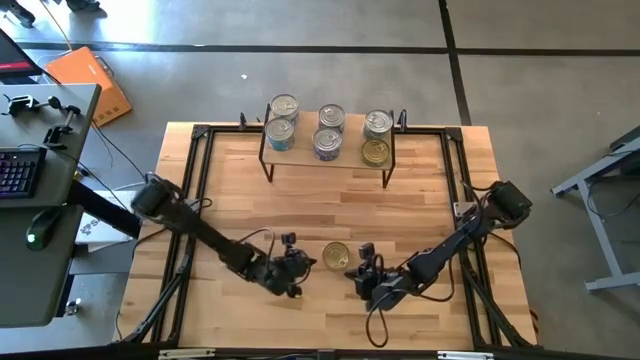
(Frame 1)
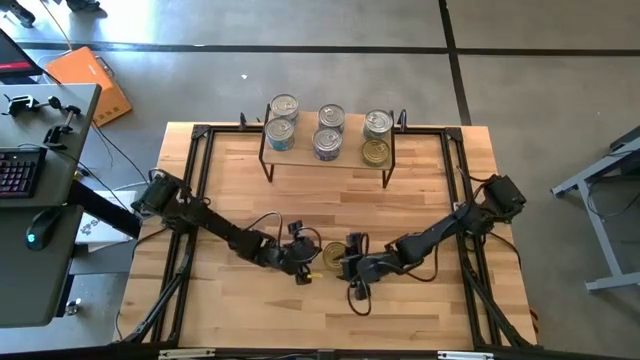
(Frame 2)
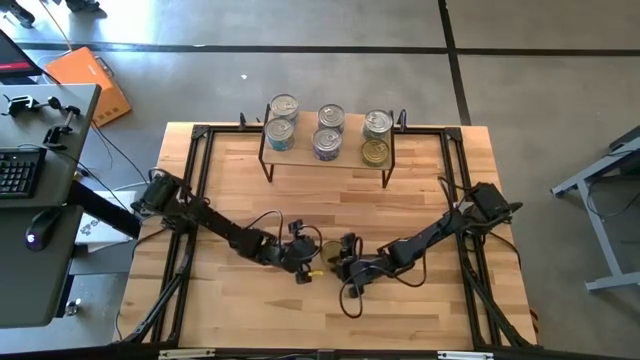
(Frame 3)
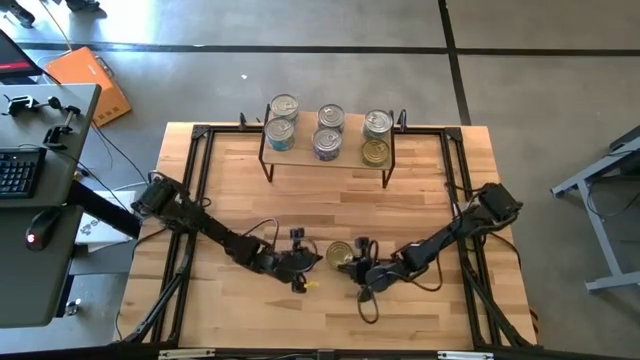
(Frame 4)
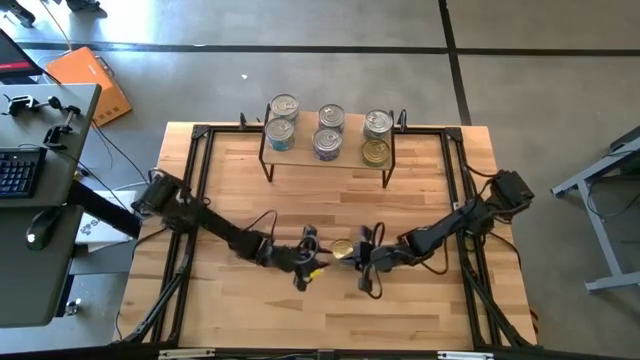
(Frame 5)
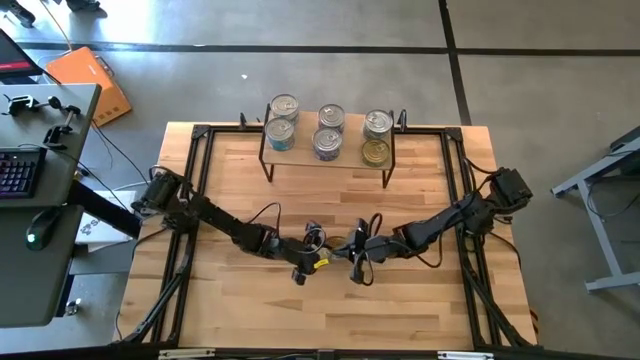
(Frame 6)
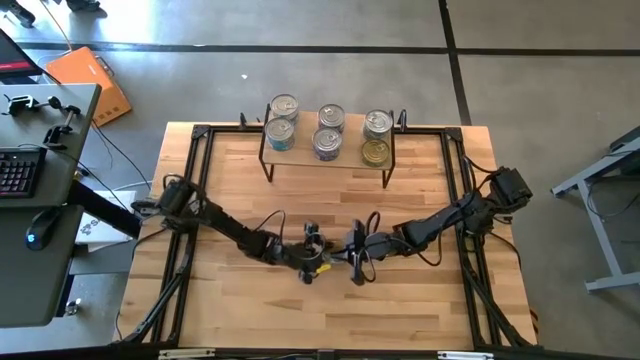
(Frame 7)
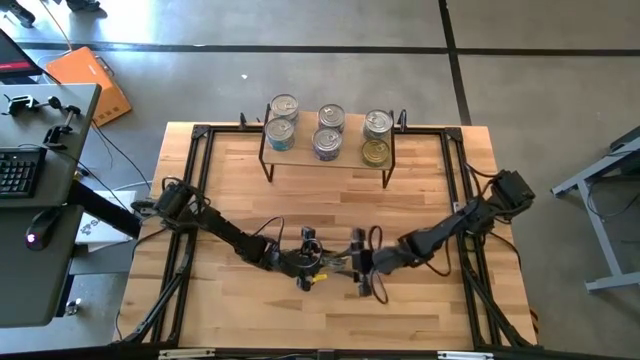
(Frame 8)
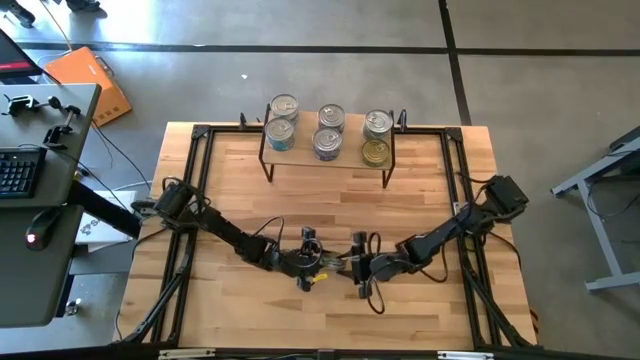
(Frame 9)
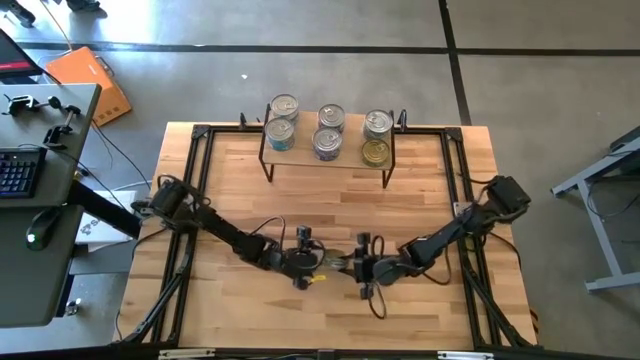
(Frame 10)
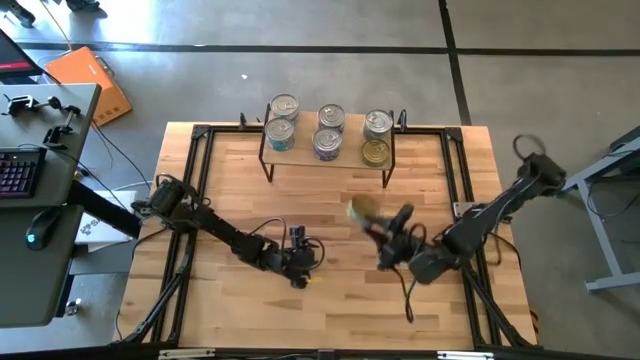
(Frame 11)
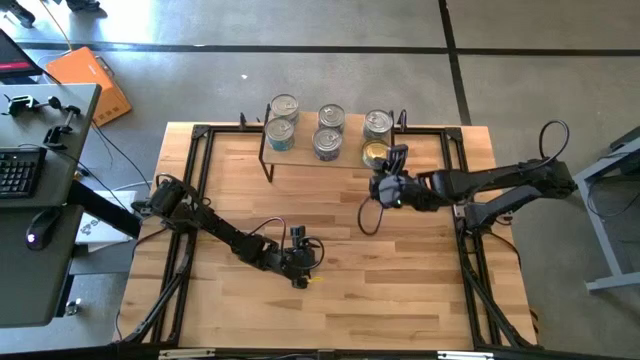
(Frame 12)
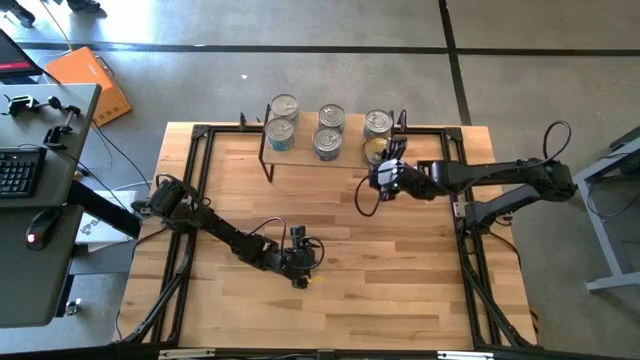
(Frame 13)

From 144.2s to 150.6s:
Task: Stack canned seafood by type on shelf
Stack the green tuna can on top of the green tuna can on the shelf

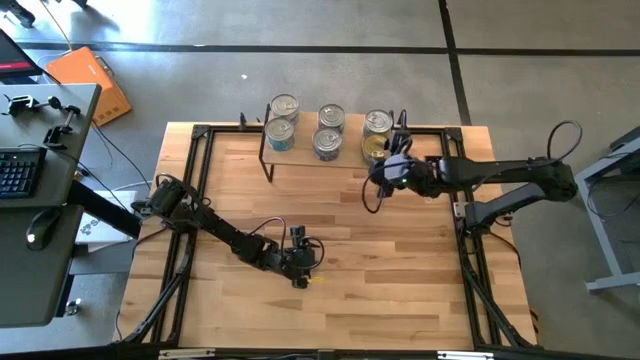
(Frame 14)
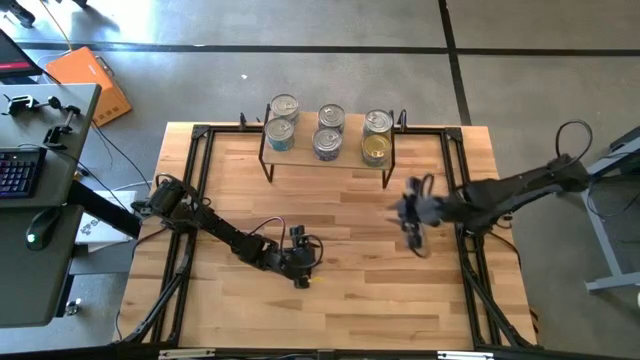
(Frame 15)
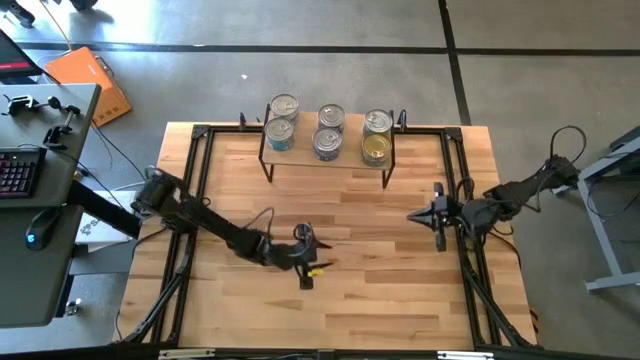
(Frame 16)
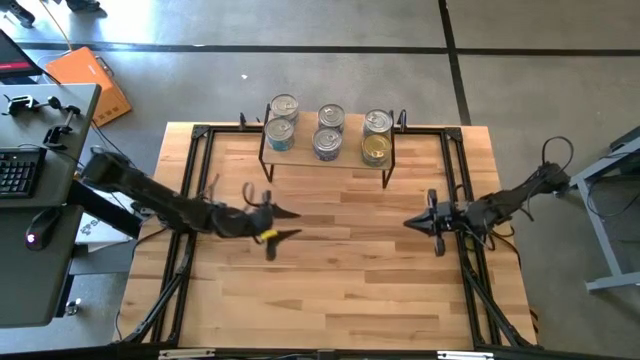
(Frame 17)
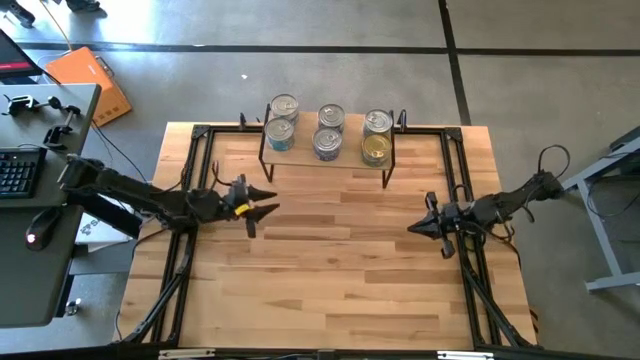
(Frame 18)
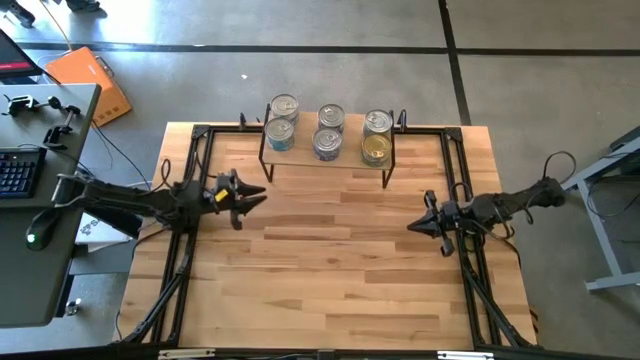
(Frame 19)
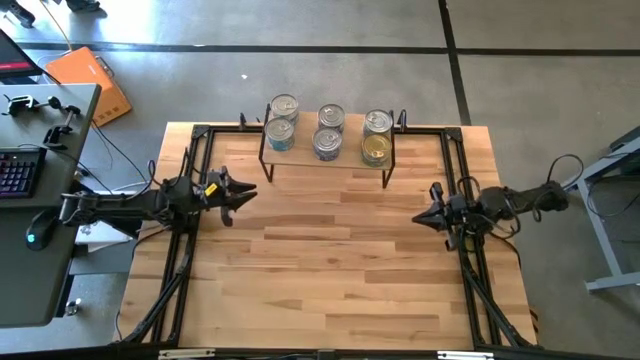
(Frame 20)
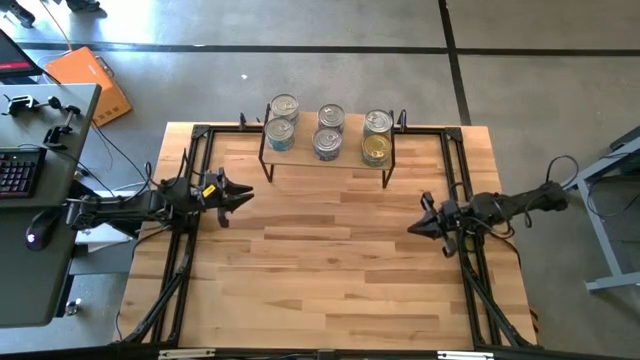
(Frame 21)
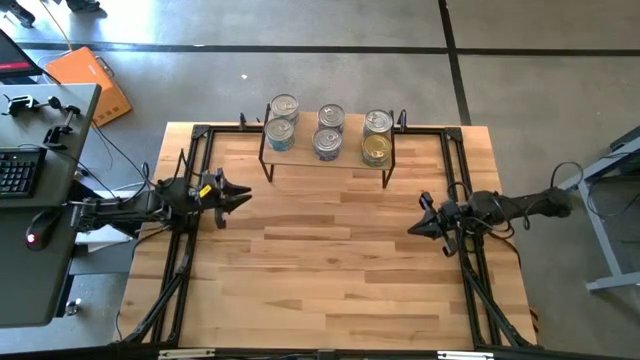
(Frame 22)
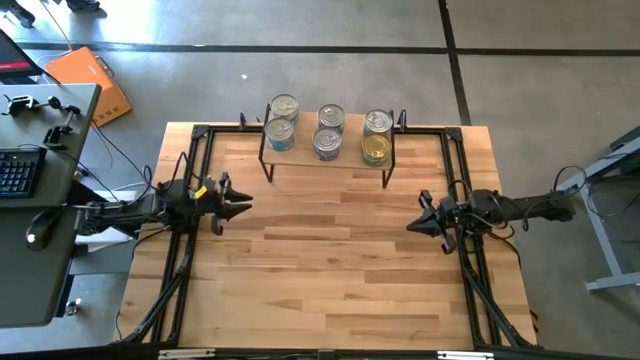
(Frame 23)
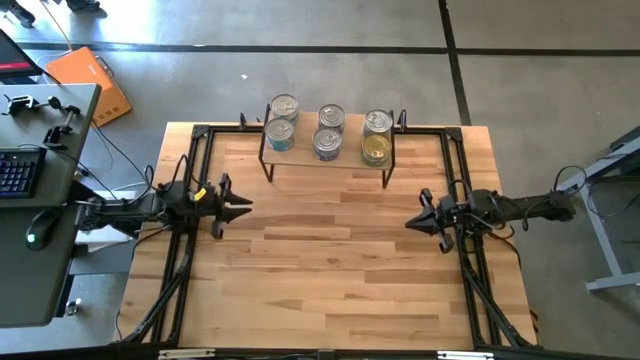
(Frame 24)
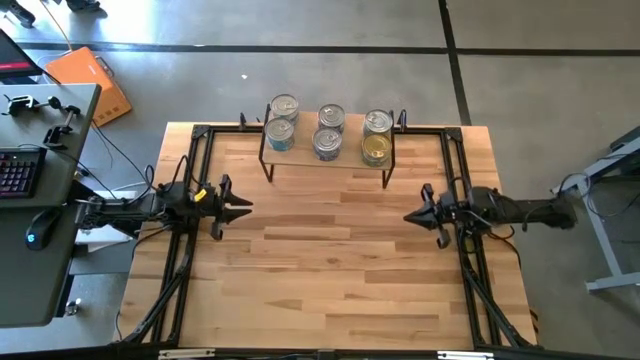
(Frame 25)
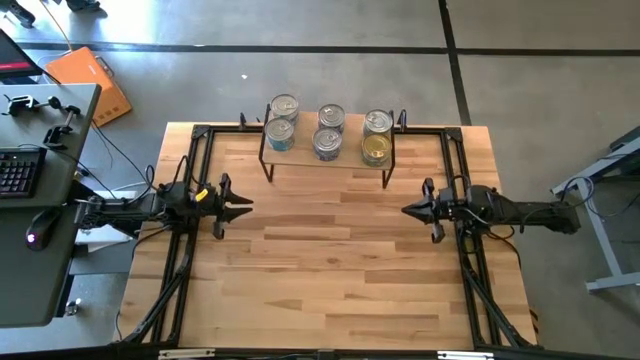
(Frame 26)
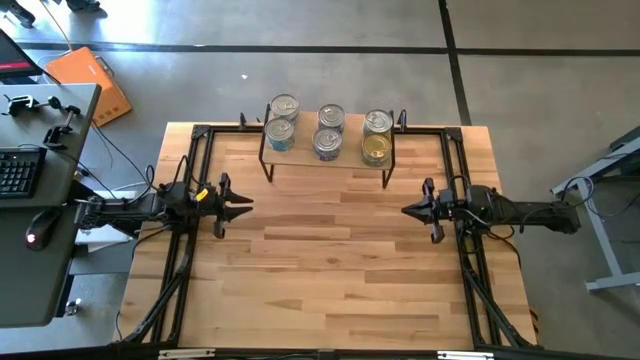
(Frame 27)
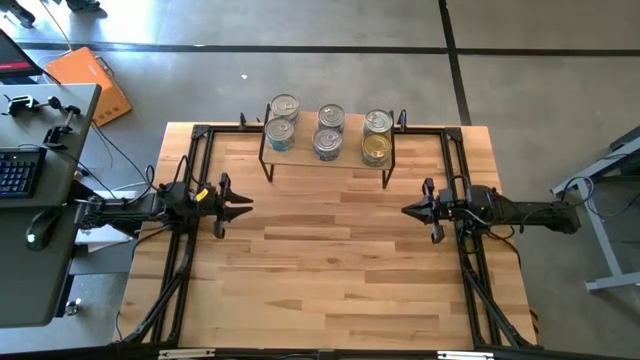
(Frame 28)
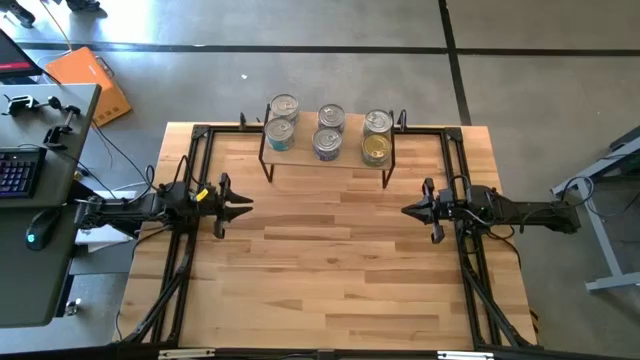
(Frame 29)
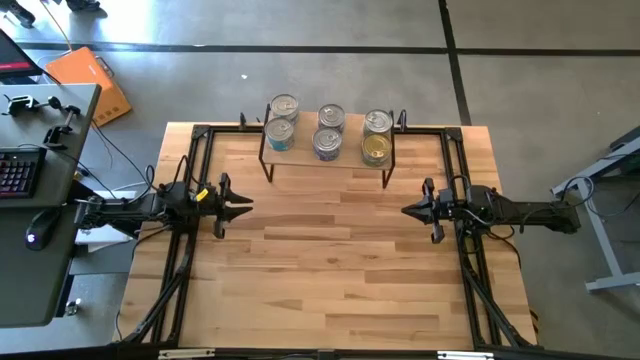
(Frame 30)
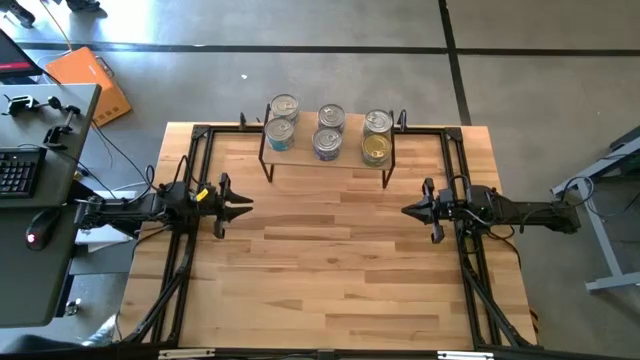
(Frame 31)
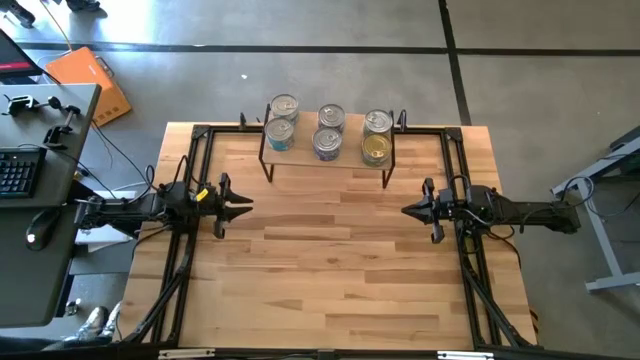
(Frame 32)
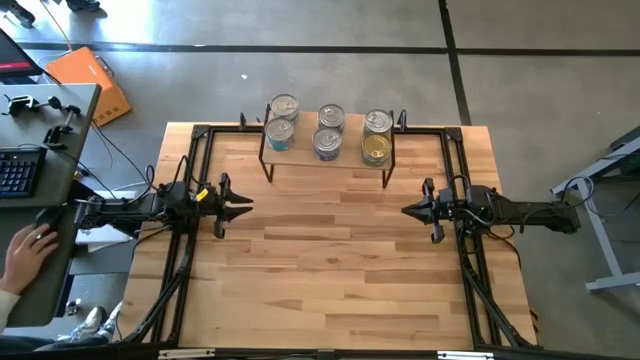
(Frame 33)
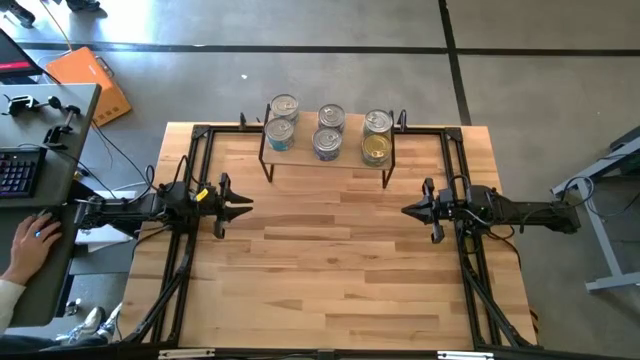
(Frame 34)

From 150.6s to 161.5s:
Return to Home Position

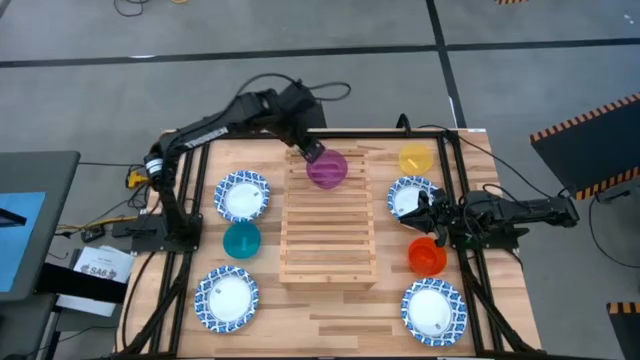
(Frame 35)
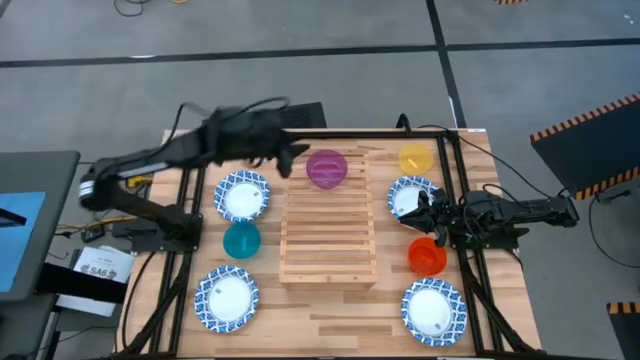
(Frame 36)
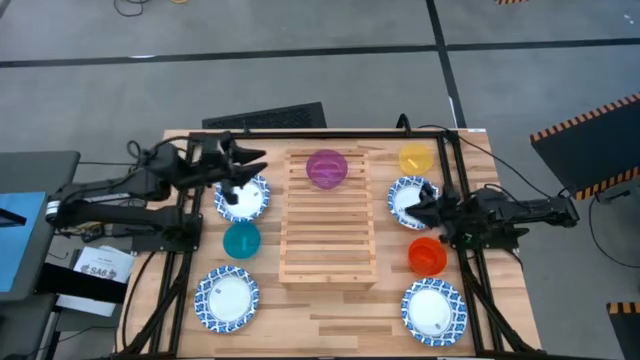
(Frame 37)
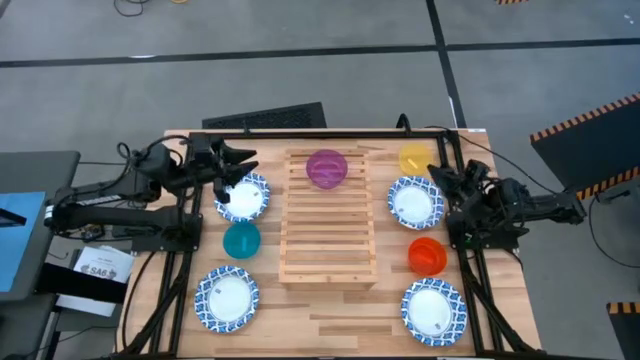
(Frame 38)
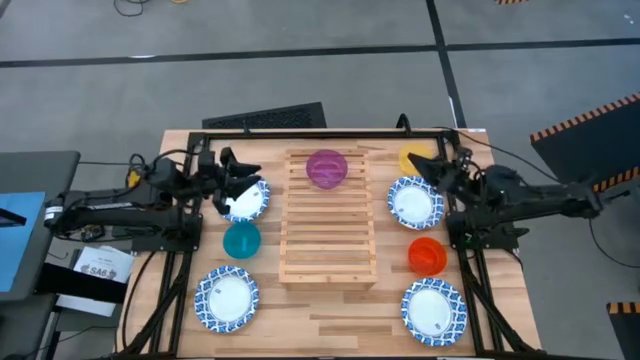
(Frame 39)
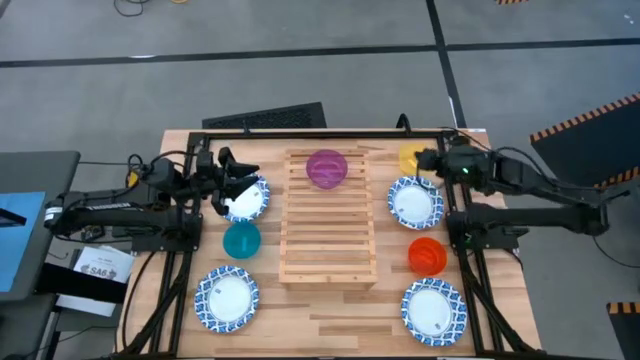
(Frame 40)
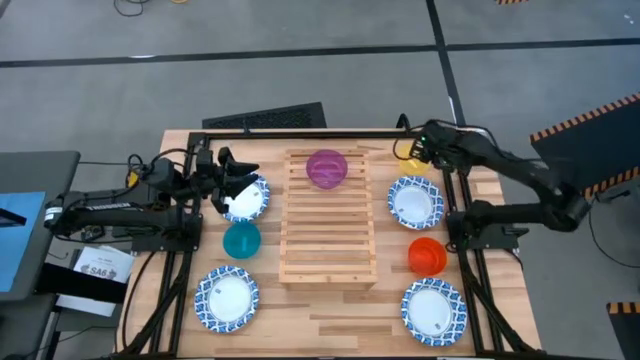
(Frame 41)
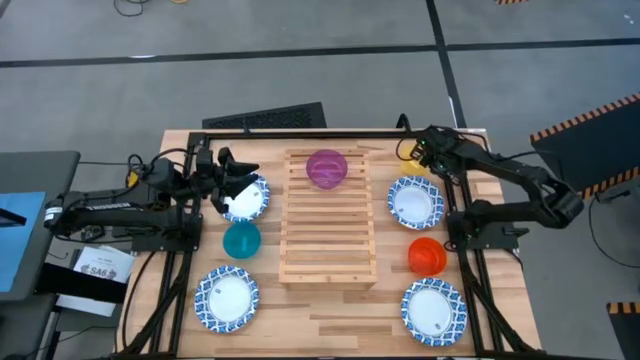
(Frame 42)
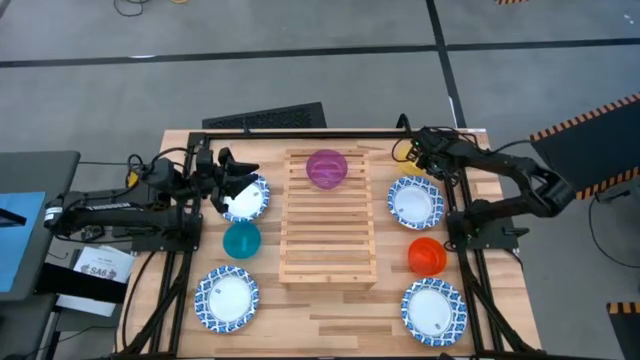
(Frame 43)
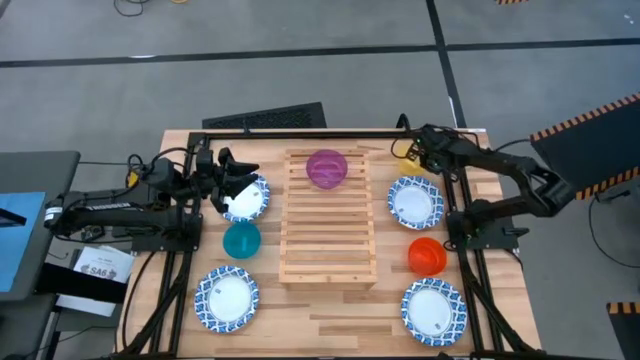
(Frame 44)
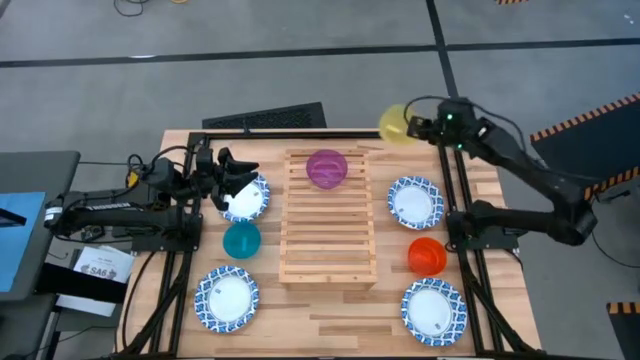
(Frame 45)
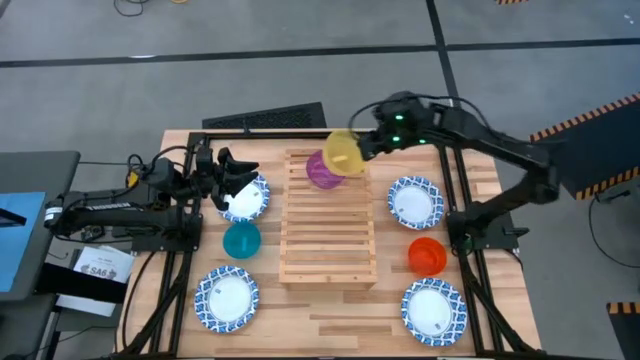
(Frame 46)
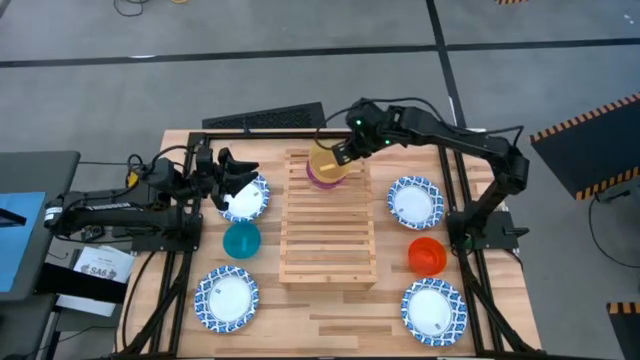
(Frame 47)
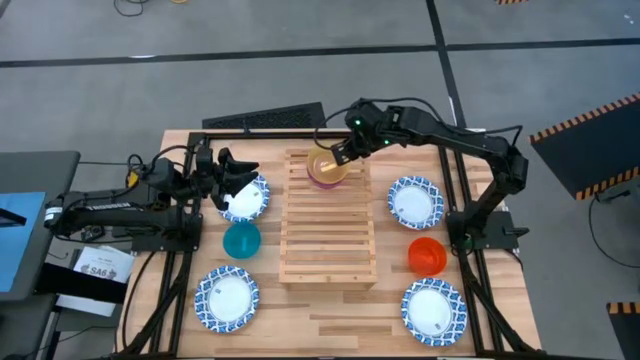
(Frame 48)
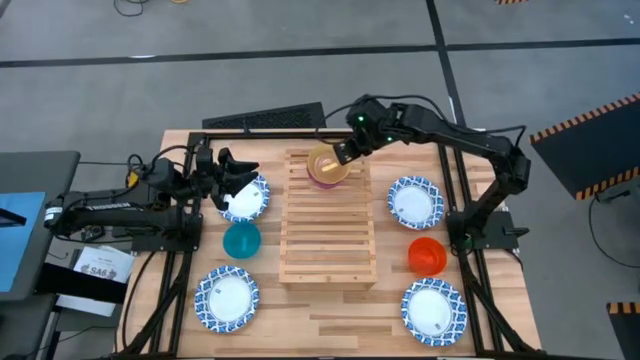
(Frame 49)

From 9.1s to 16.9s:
Task: Place and stack bowls onto a shelf
Stack the yellow bowl on top of the purple bowl on the shelf
